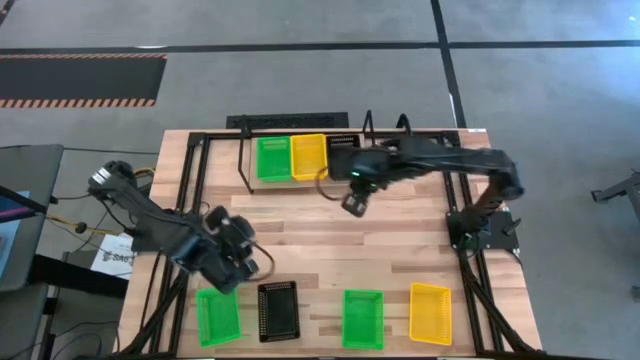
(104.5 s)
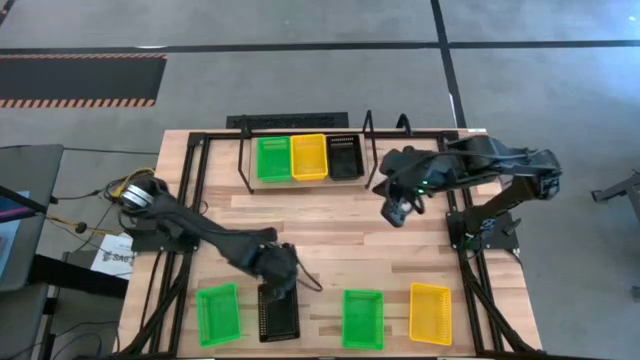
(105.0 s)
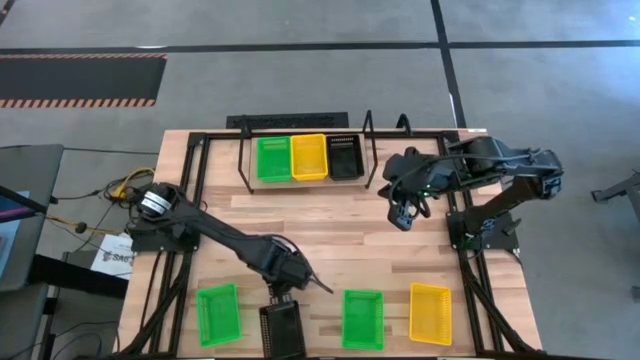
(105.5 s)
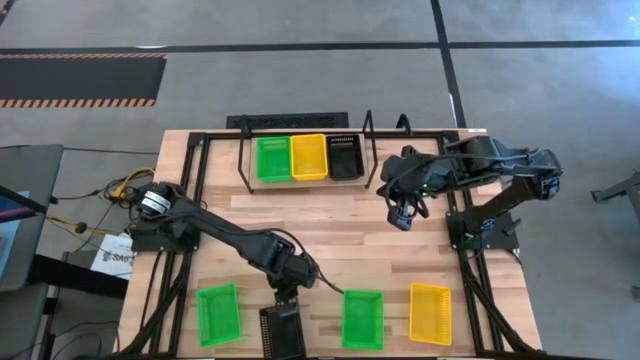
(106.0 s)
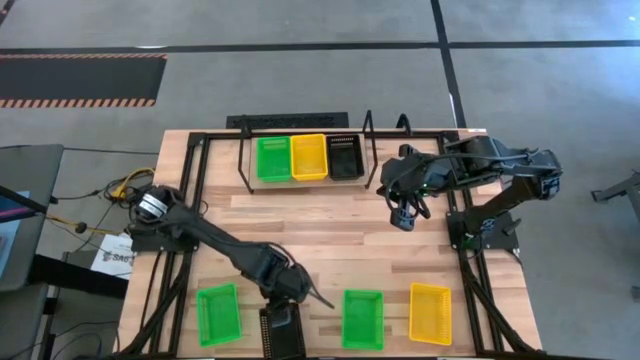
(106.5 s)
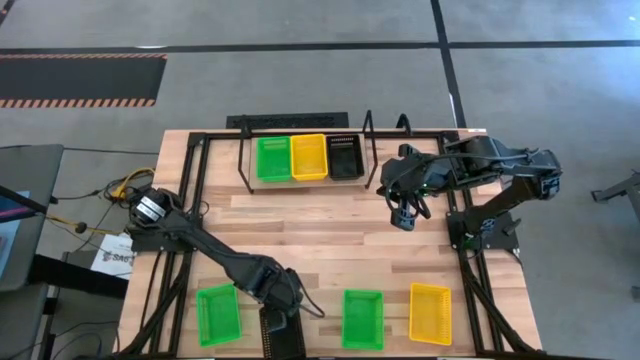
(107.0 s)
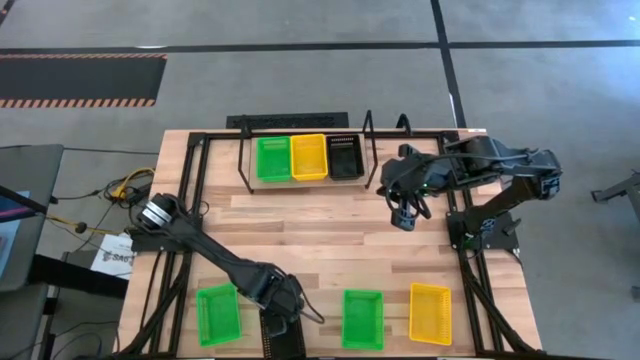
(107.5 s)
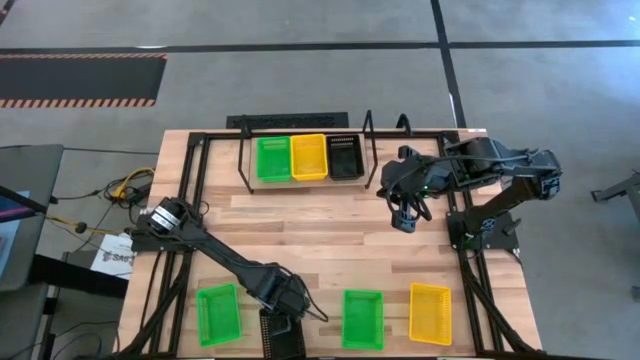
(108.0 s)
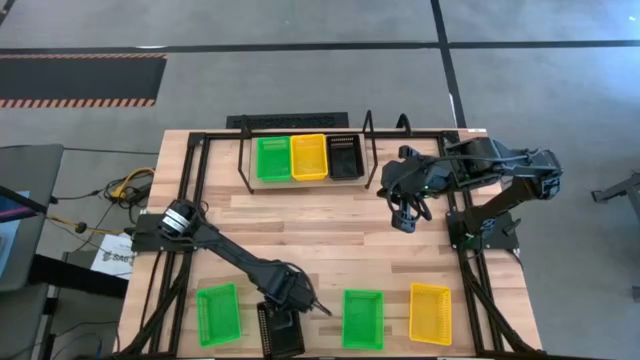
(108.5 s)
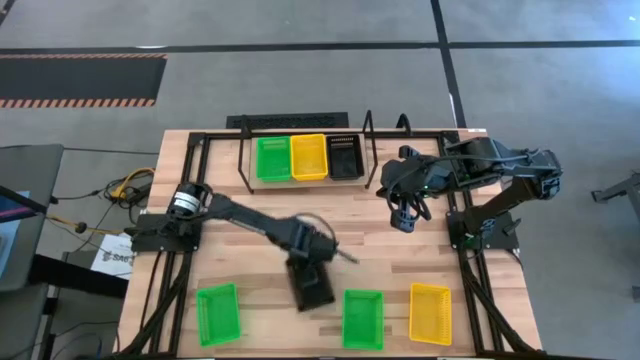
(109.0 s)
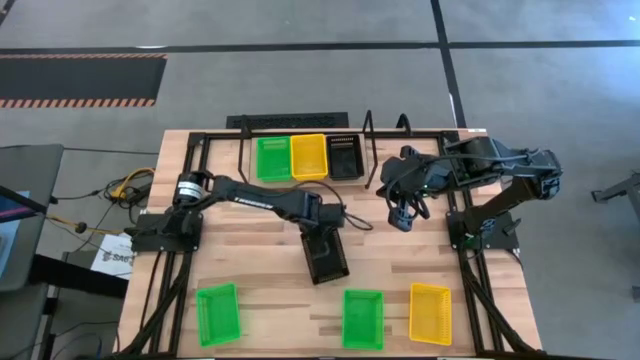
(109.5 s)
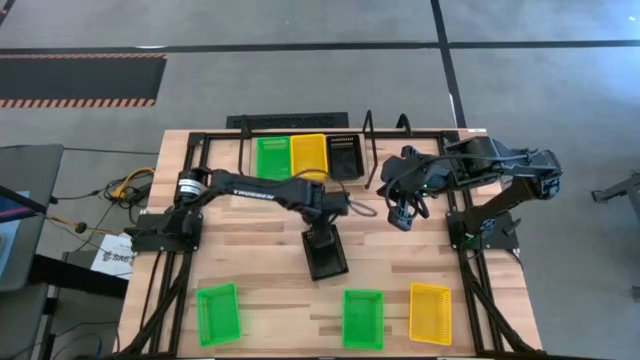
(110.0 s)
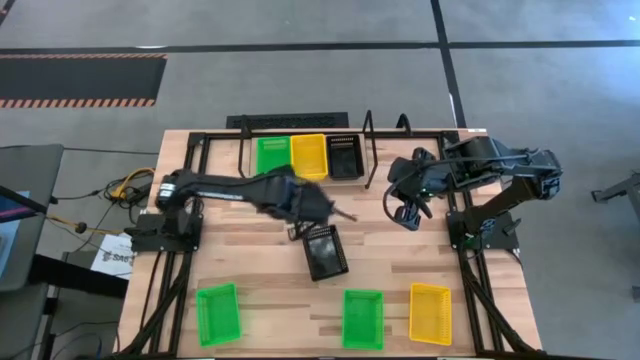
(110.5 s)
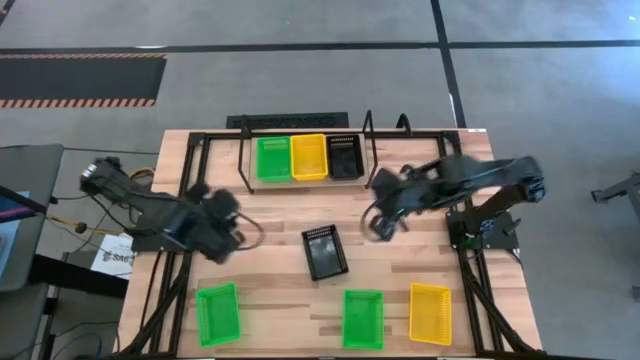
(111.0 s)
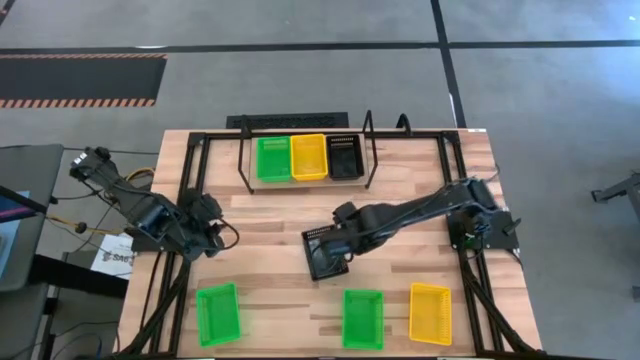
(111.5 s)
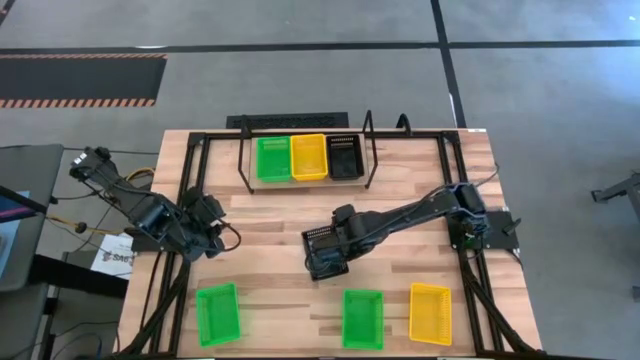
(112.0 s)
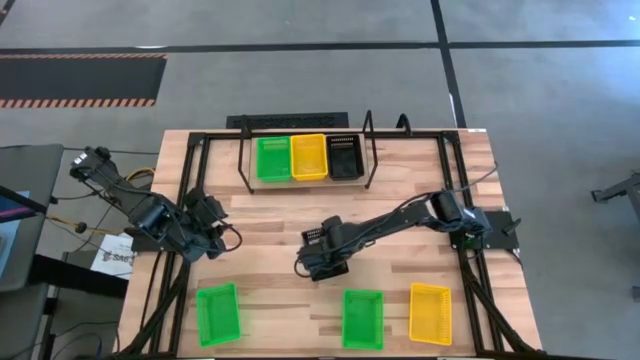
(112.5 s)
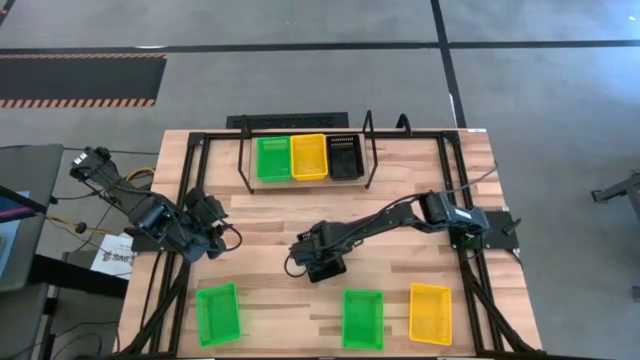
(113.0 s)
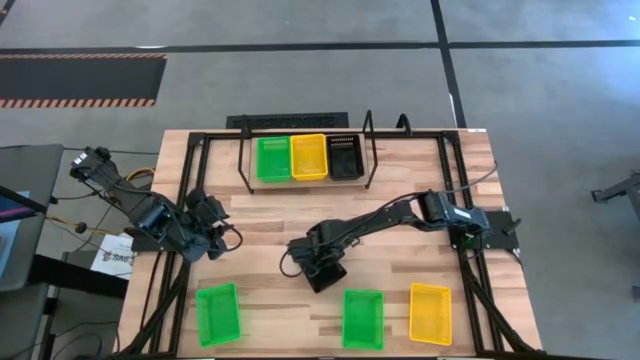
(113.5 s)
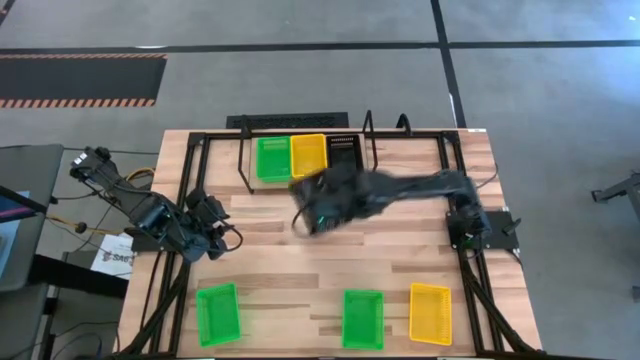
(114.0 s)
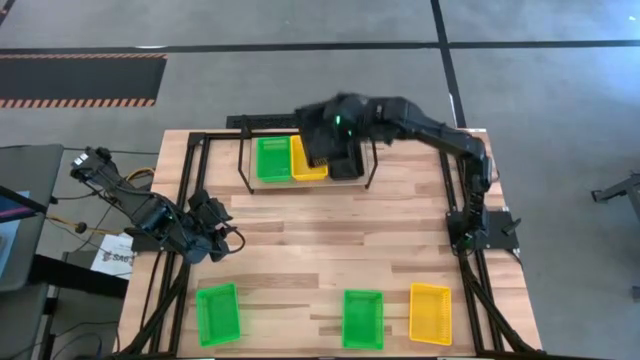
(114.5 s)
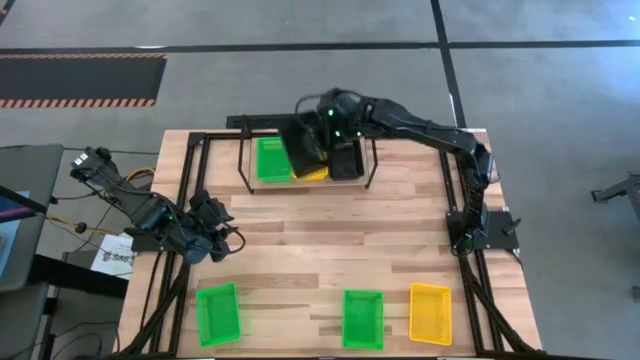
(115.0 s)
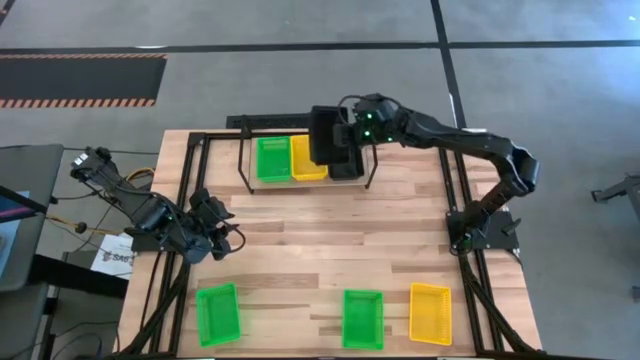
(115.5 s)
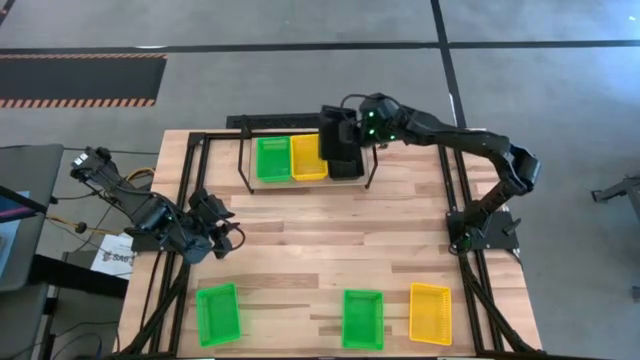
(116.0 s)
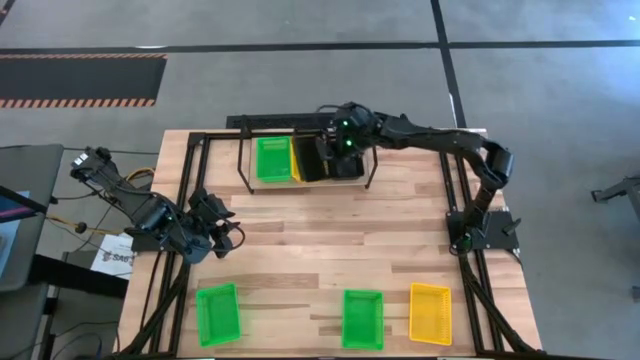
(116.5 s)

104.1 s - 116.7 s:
Task: Stack baskets on shelf by color
Stack the black bin on top of the black bins on the shelf

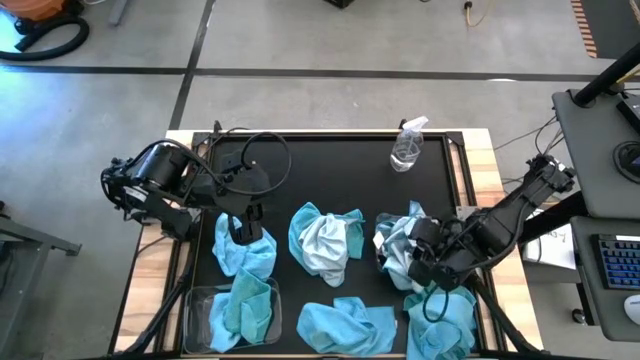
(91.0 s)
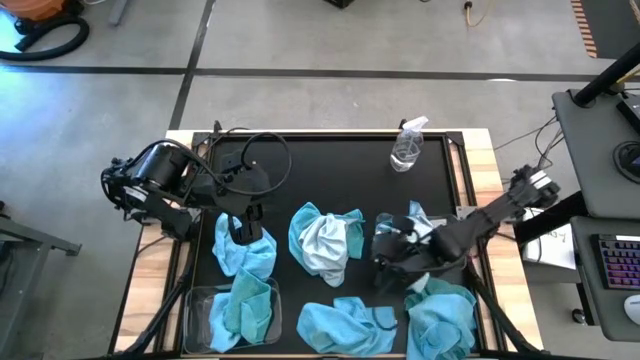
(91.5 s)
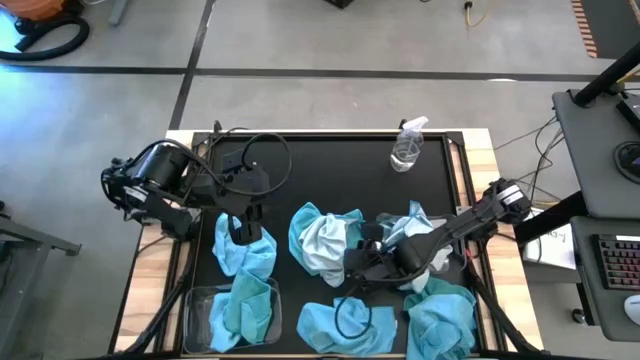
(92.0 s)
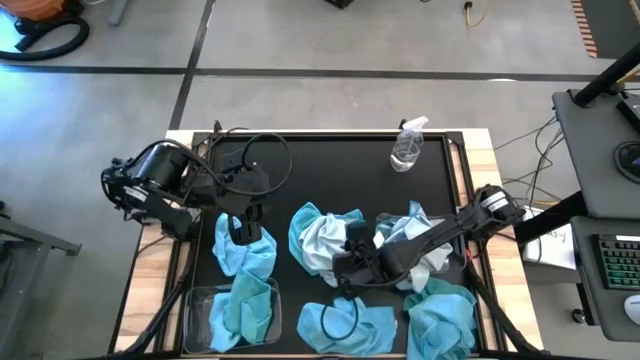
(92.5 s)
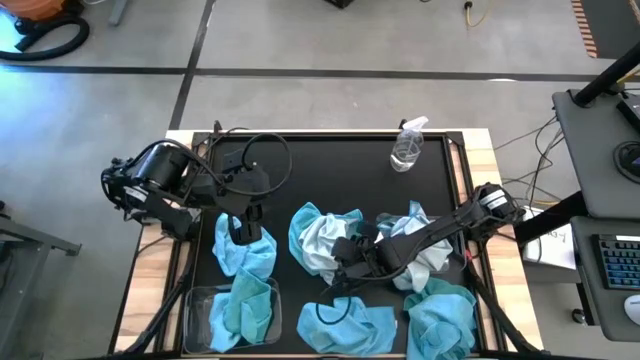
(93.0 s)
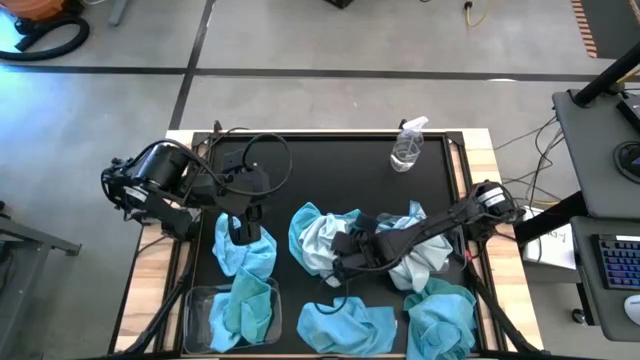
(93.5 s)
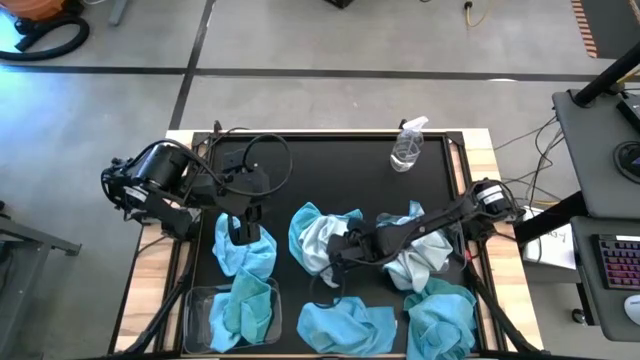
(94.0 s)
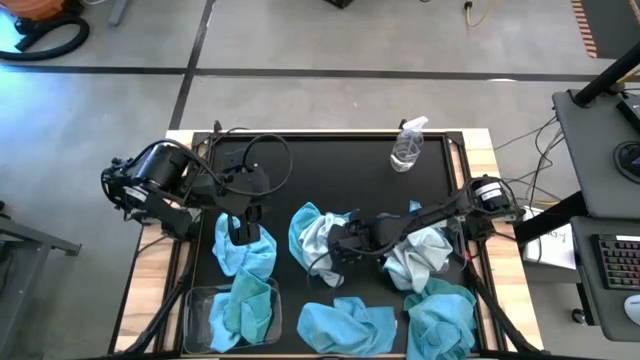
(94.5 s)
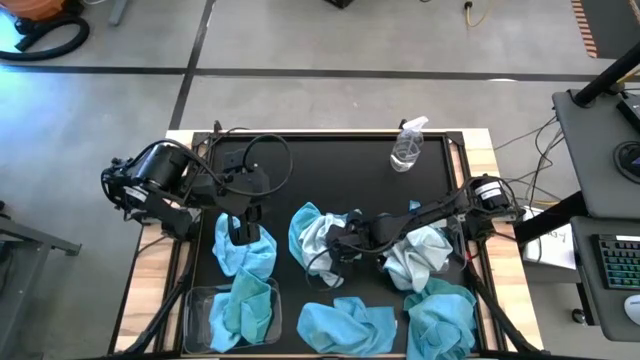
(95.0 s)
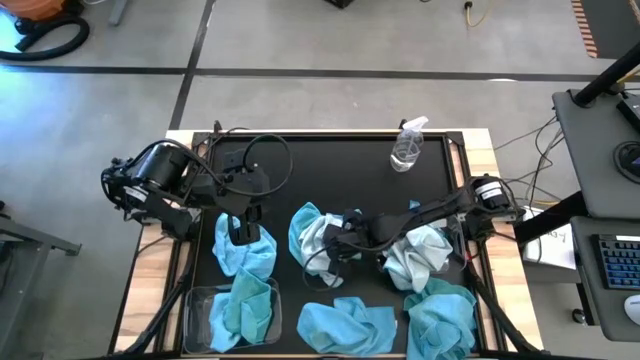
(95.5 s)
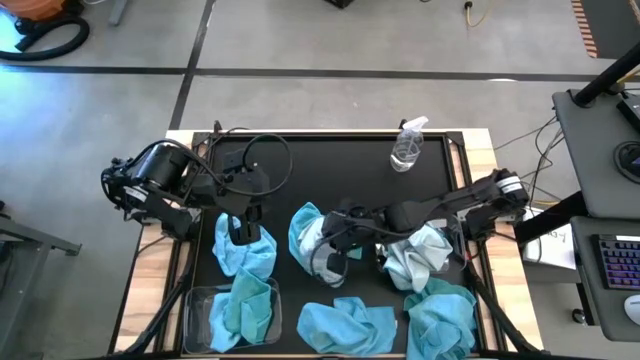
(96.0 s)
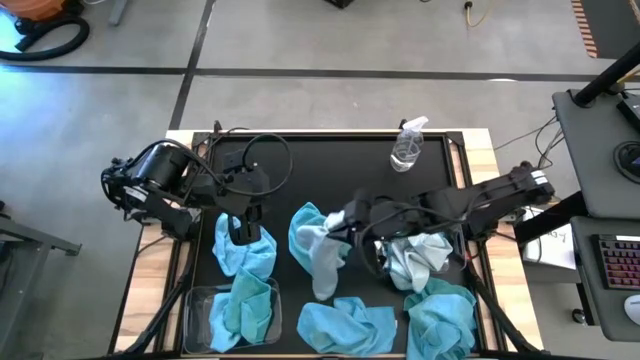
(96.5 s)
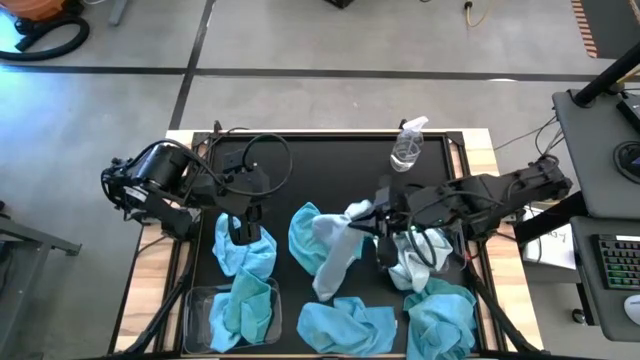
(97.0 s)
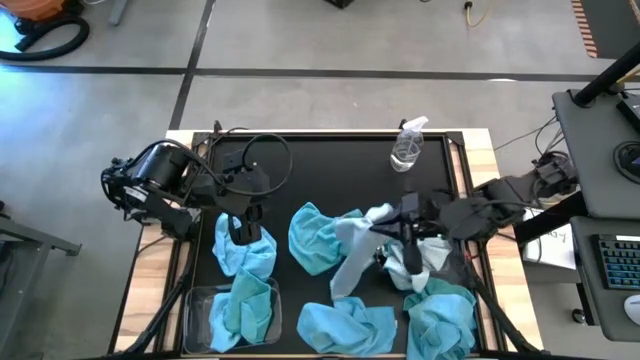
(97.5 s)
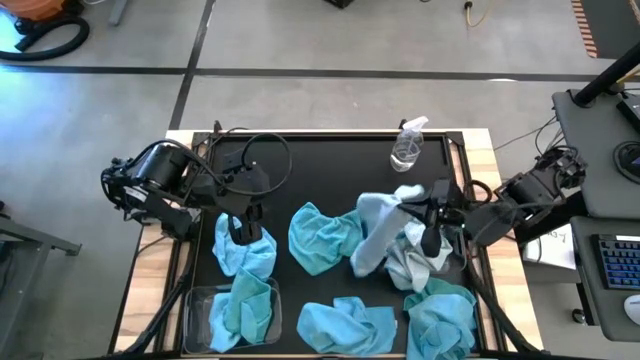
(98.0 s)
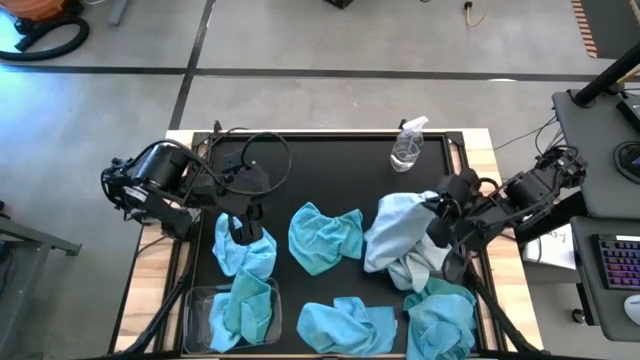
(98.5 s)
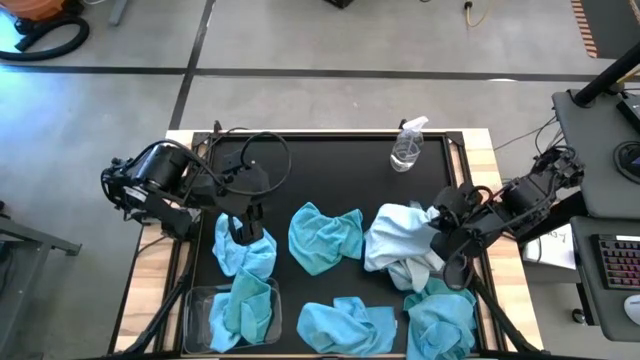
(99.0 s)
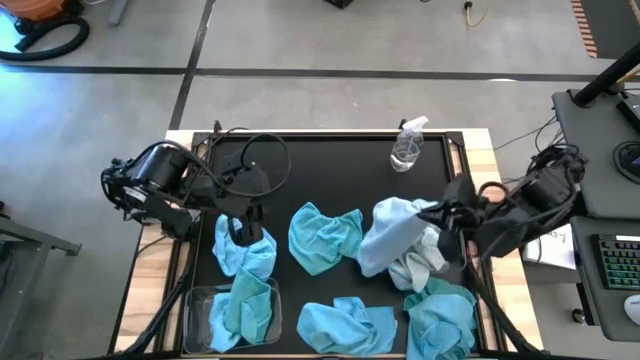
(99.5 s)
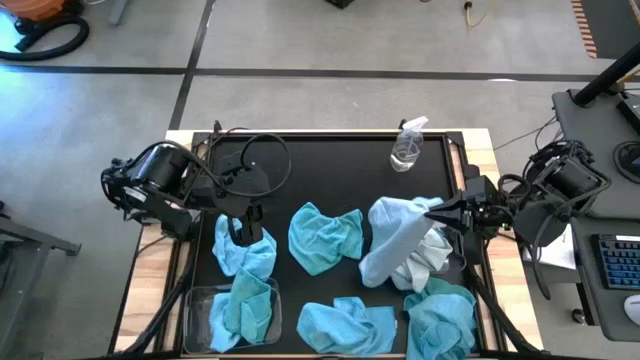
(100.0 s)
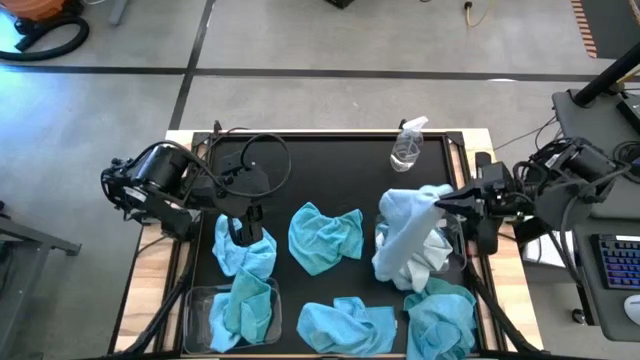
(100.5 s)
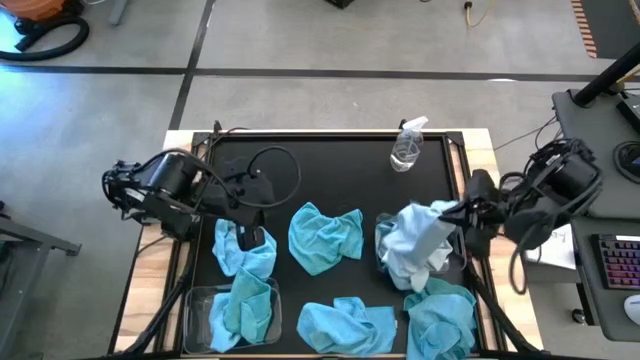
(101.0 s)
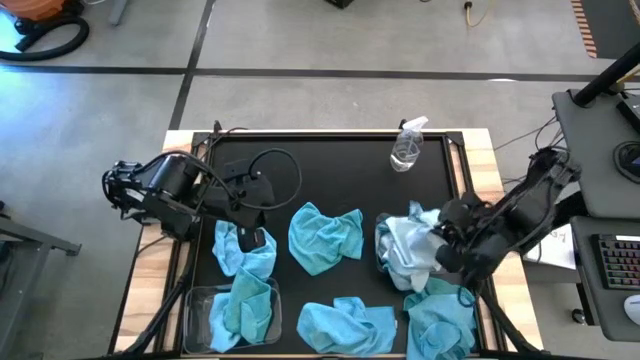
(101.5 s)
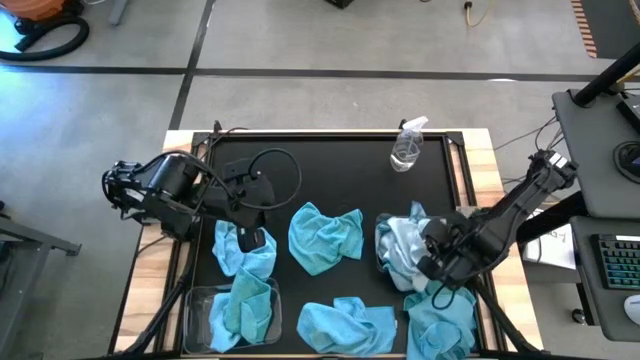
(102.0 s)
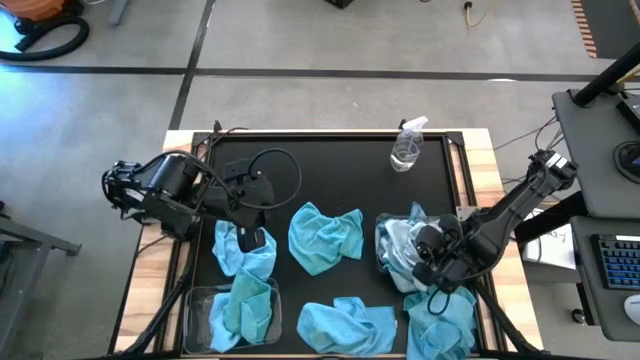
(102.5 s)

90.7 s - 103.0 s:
Task: Sort microfiber towel by color & place in baskets
Put the light blue microfiber towel into the right transparent bin
